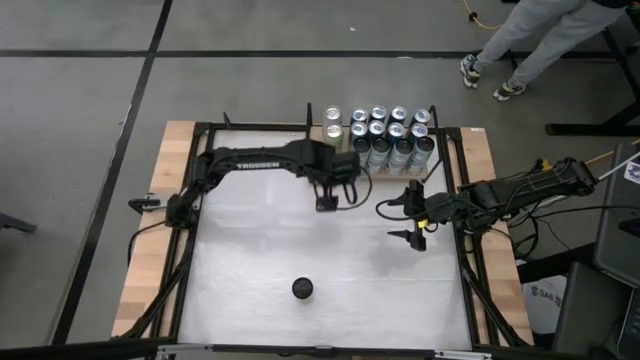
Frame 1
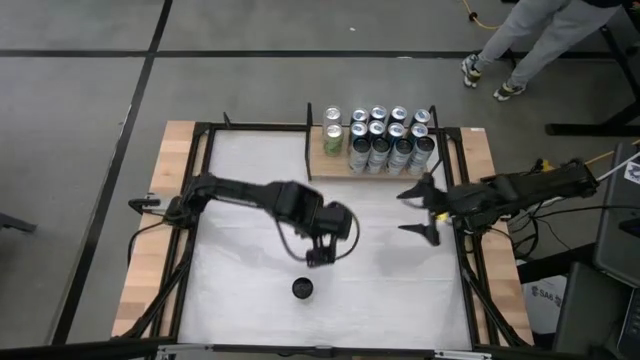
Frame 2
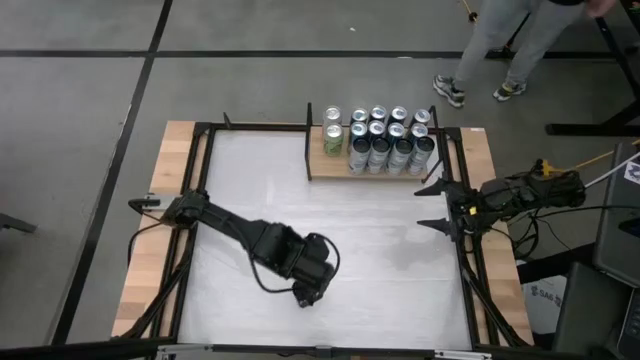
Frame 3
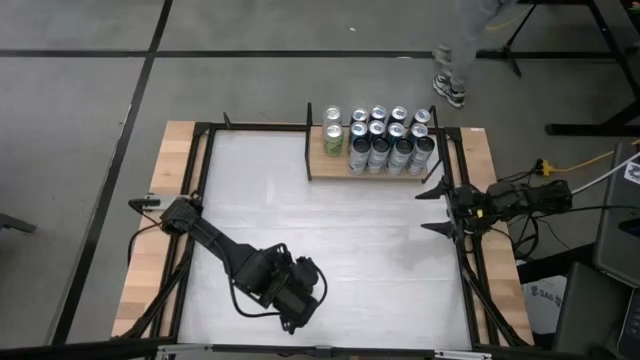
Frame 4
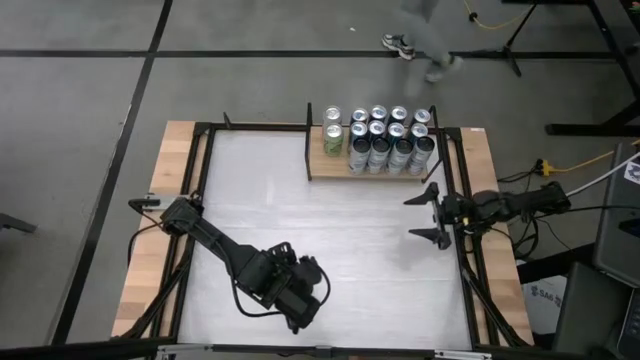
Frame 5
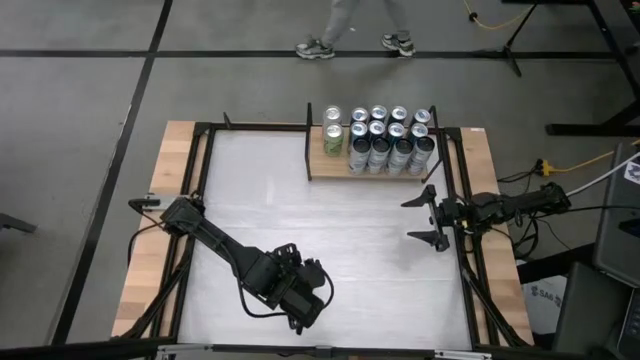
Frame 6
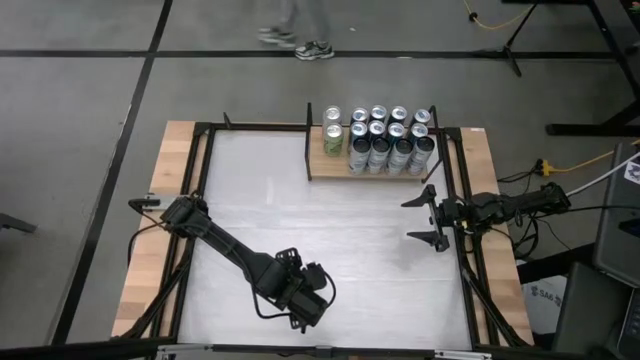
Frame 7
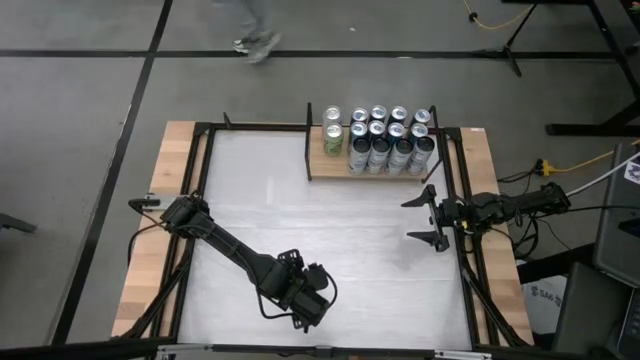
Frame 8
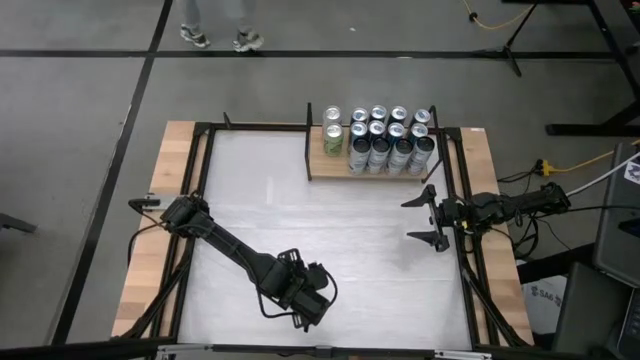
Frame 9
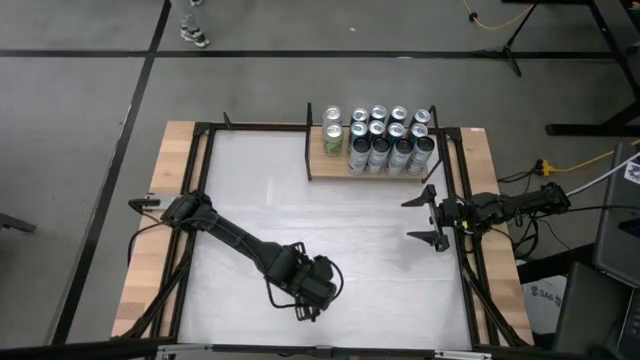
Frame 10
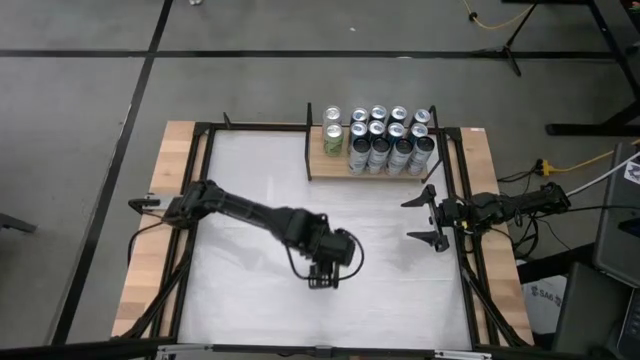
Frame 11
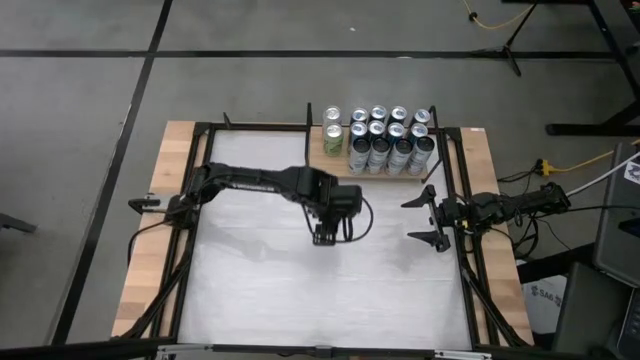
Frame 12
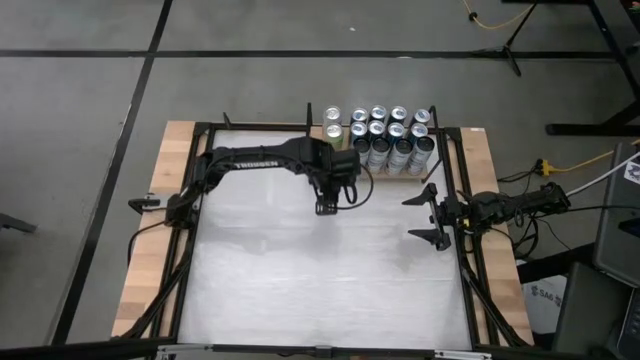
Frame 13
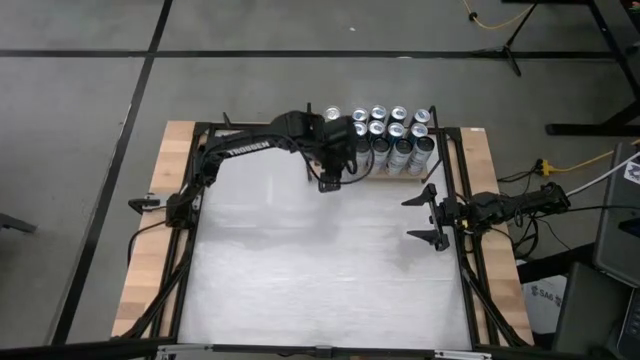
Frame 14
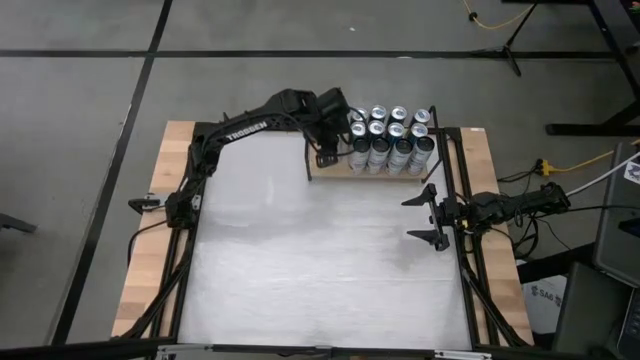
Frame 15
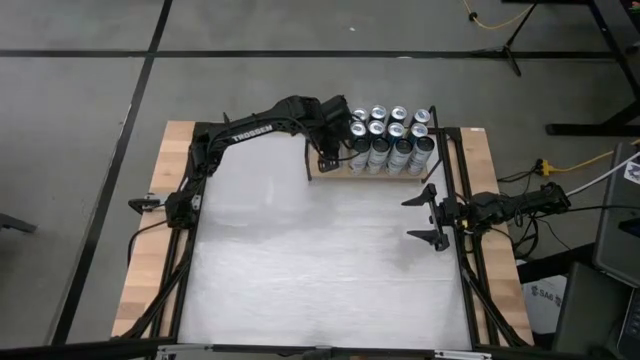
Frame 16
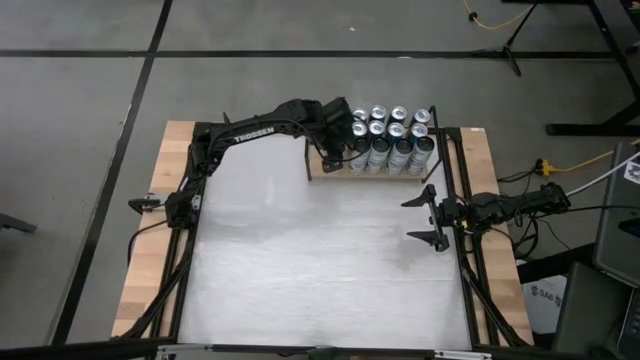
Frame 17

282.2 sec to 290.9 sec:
Task: Place canned beverage on shelf
Put the white-blue soda can on the shelf aligned with the other white-blue soda cans

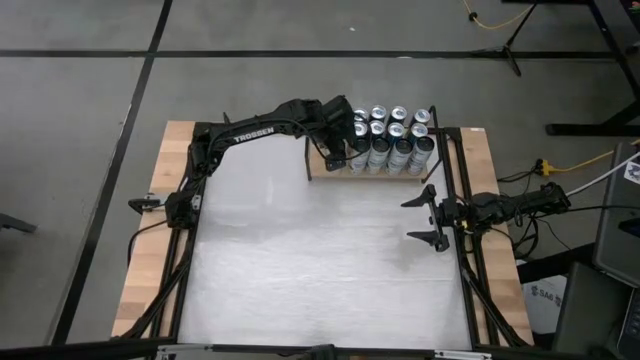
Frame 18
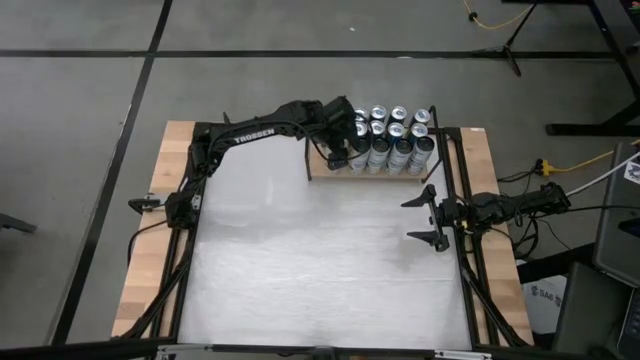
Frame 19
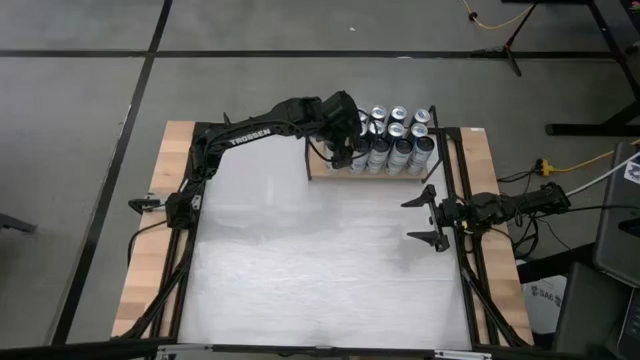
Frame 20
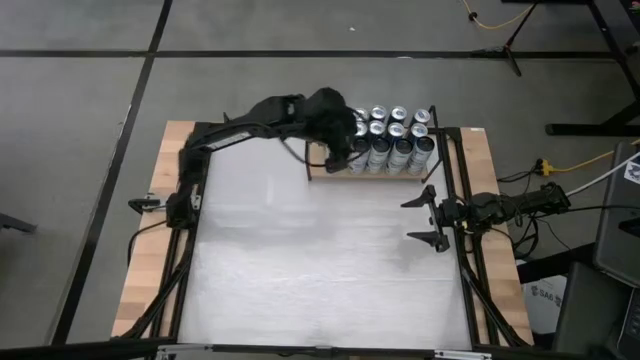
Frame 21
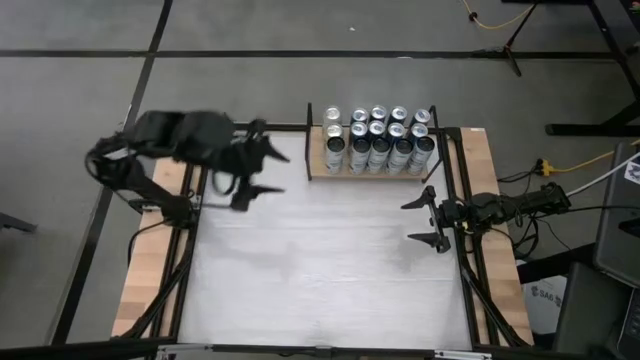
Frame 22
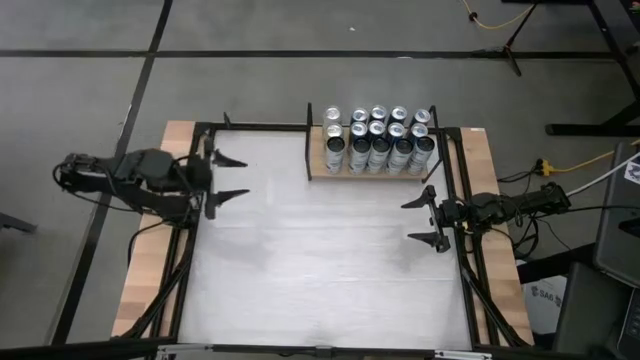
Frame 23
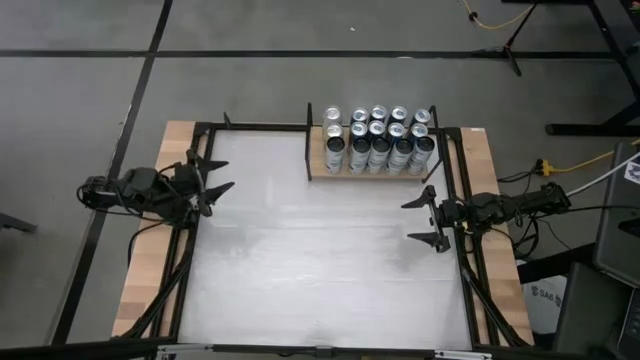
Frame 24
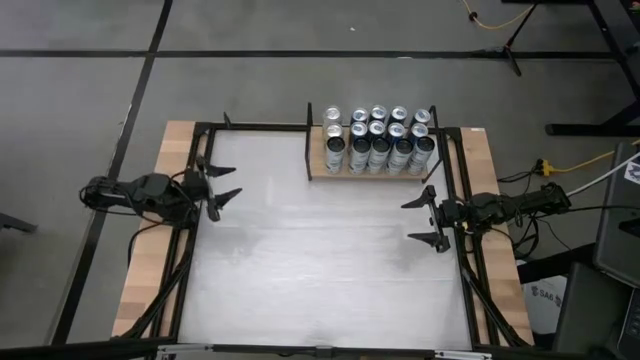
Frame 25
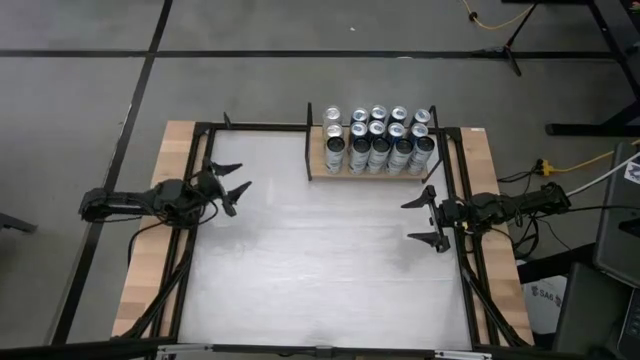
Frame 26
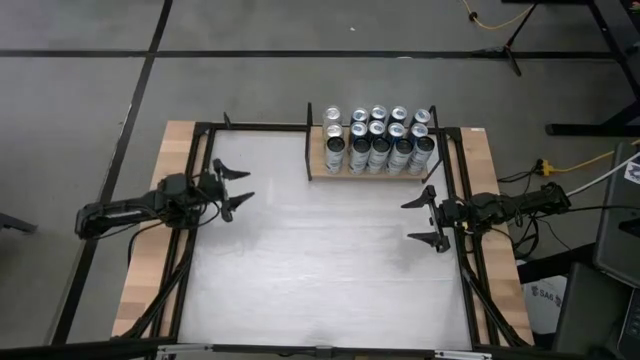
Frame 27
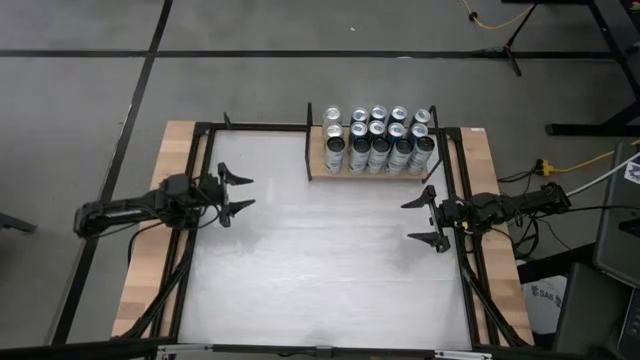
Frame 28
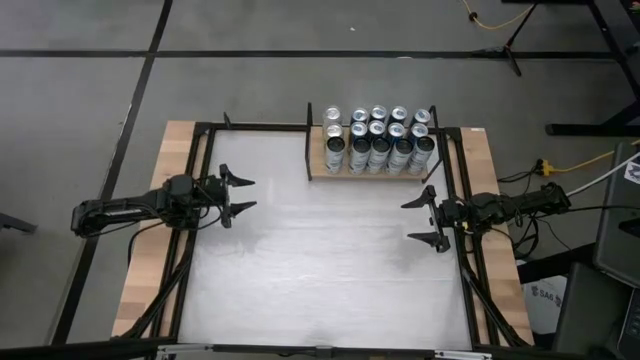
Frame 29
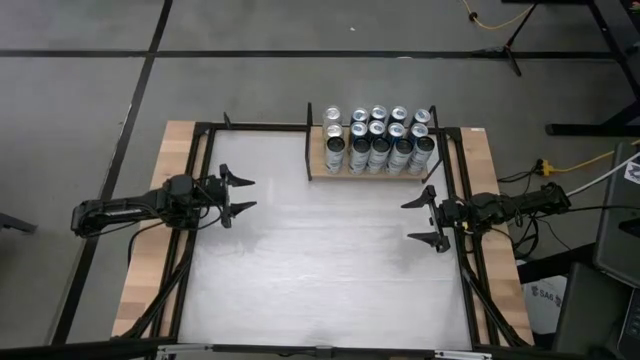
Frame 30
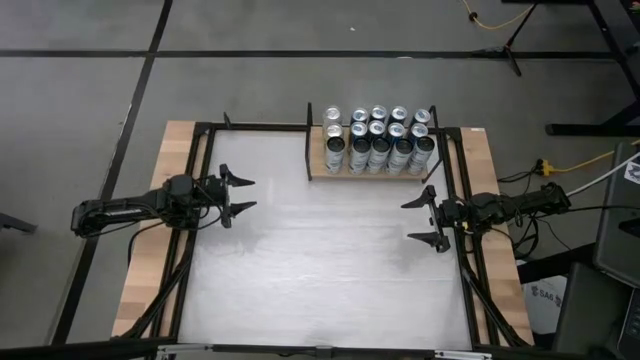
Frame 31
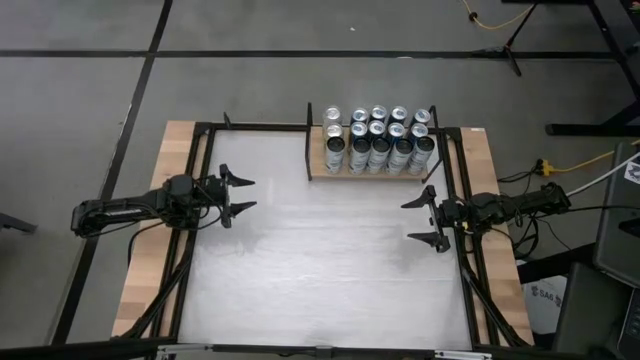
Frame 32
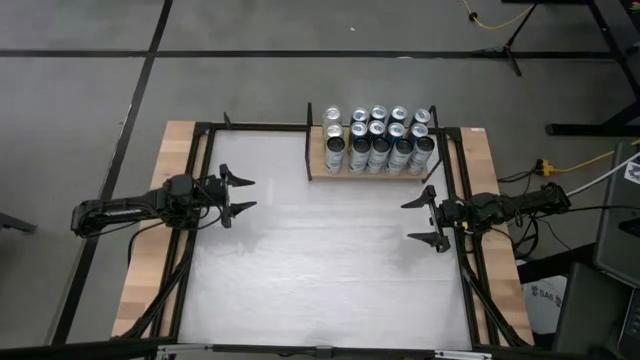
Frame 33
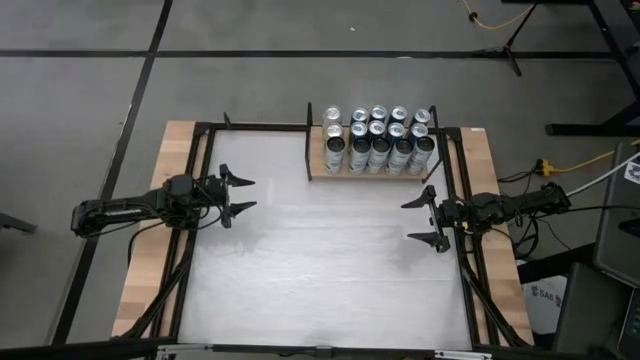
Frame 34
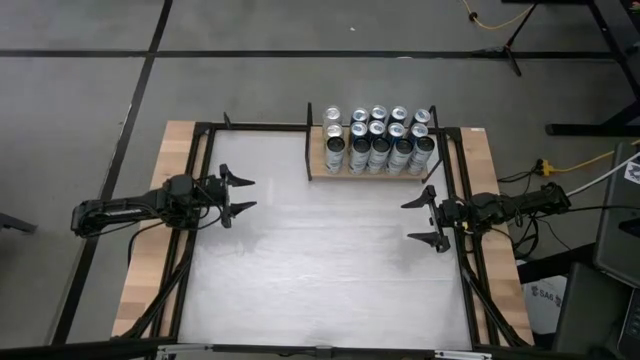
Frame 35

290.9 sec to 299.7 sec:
Return to Home Position

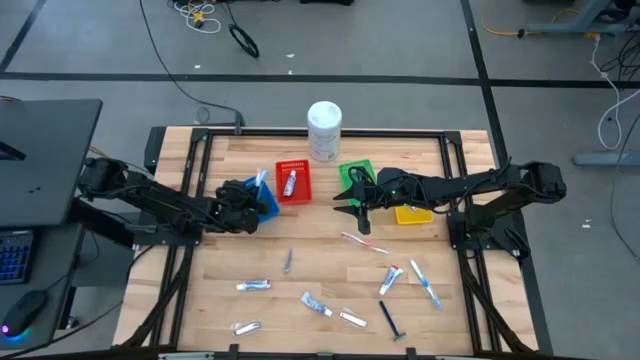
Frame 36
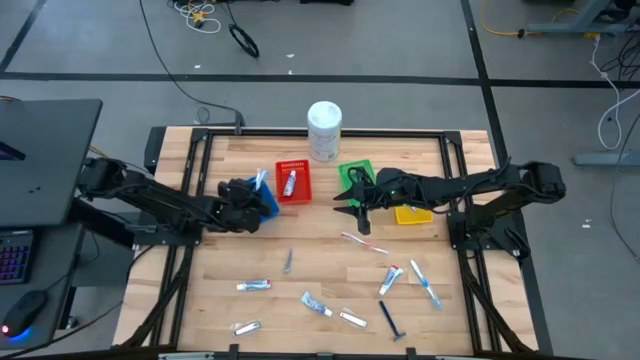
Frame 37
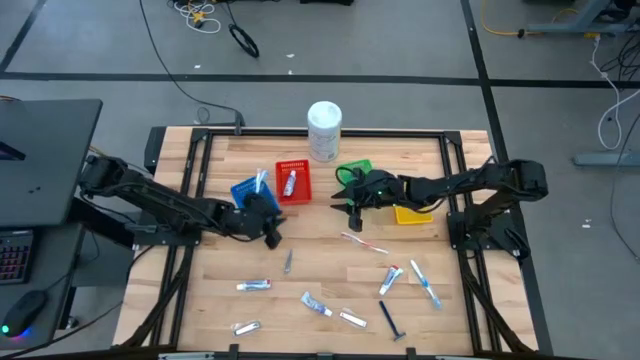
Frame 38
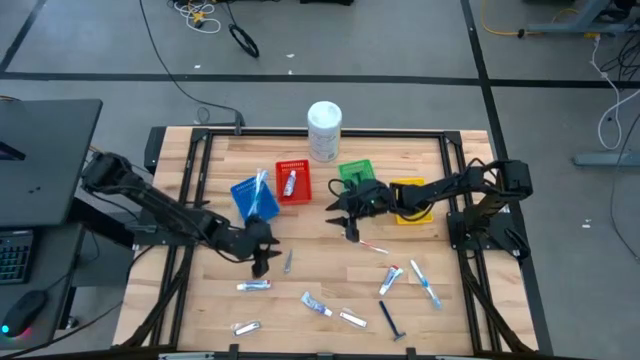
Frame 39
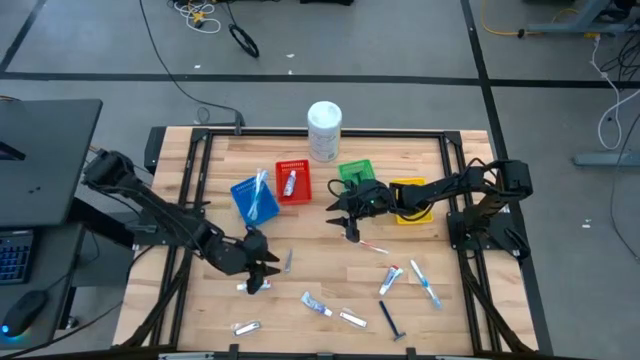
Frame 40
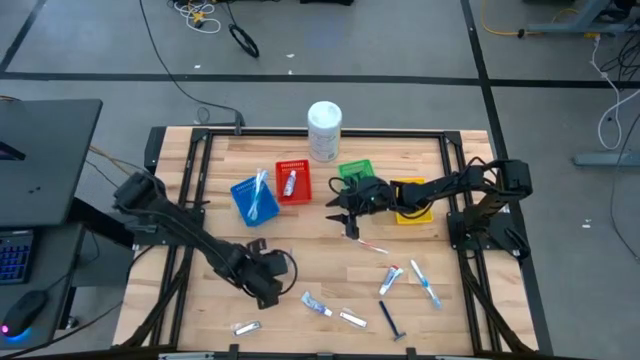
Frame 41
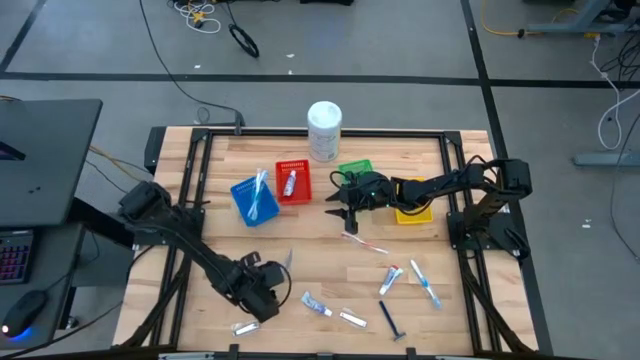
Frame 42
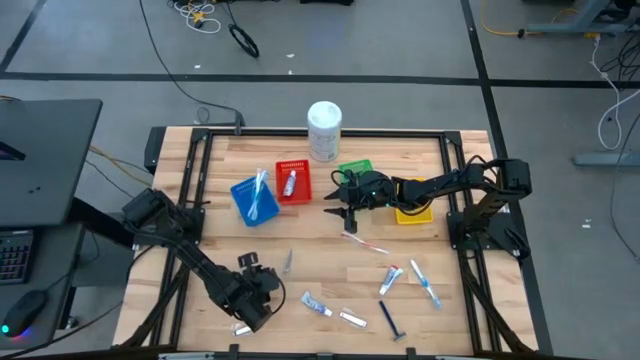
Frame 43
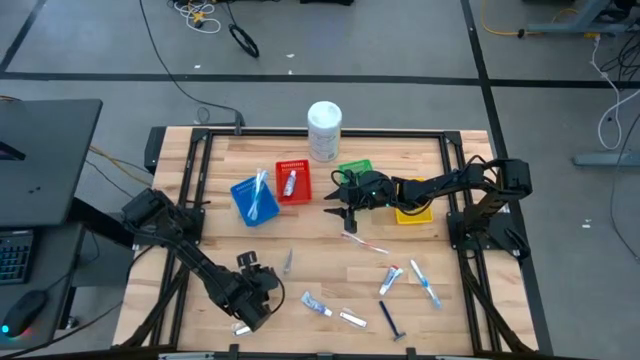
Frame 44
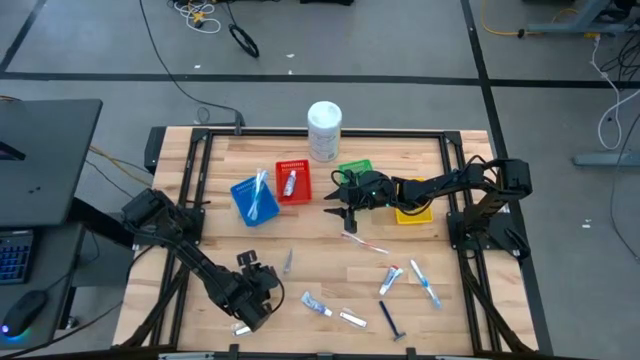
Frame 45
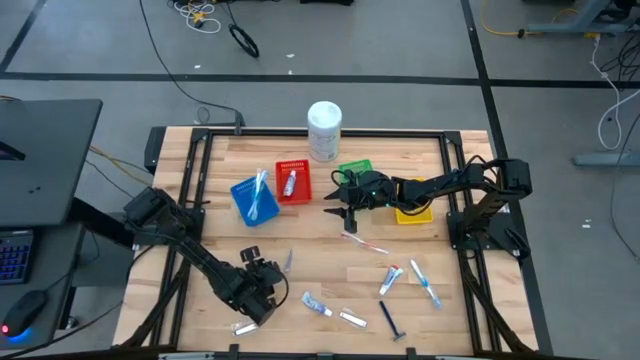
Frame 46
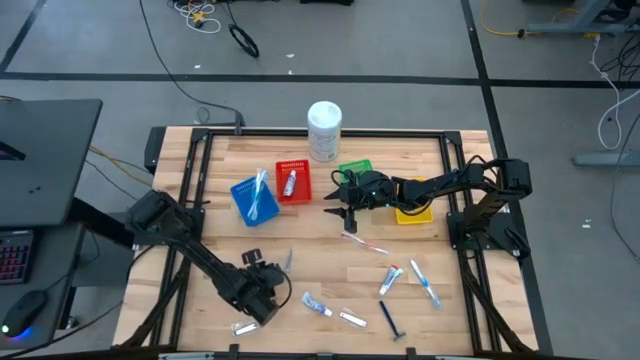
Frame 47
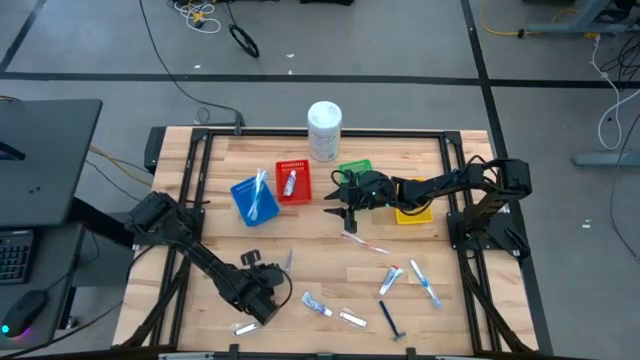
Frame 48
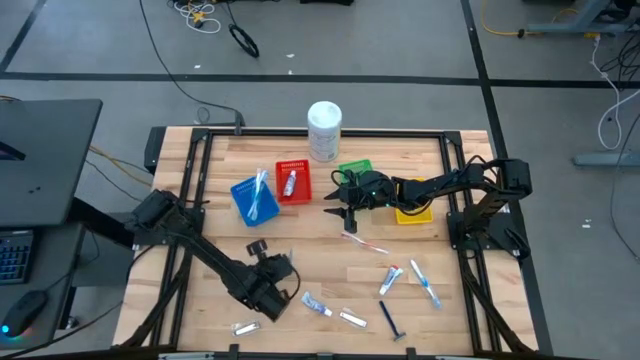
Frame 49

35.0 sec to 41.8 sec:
Task: Pick & Place Travel size toiletries
Put the white toothpaste into the red bin
